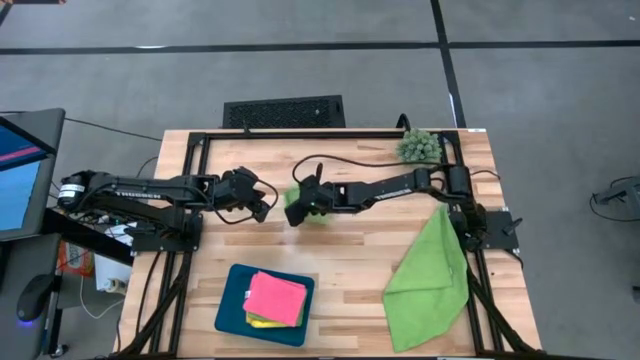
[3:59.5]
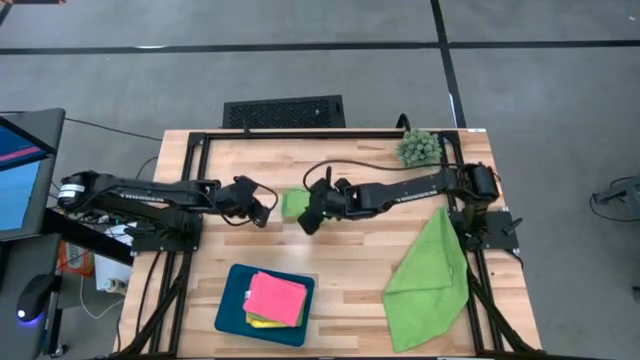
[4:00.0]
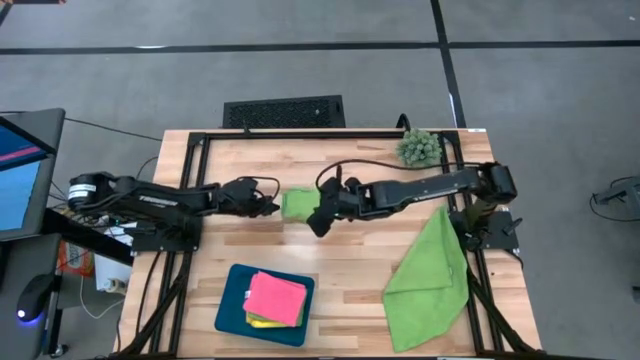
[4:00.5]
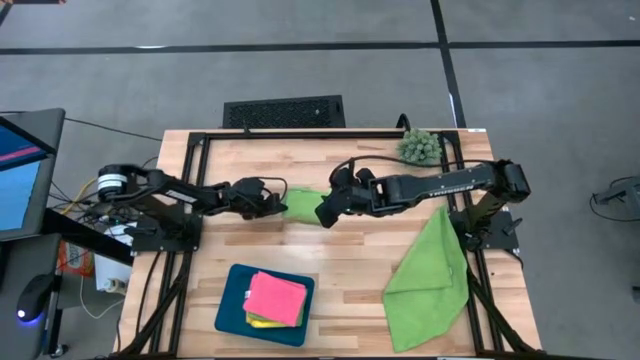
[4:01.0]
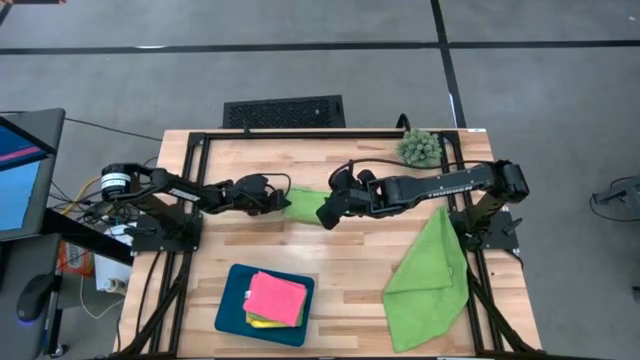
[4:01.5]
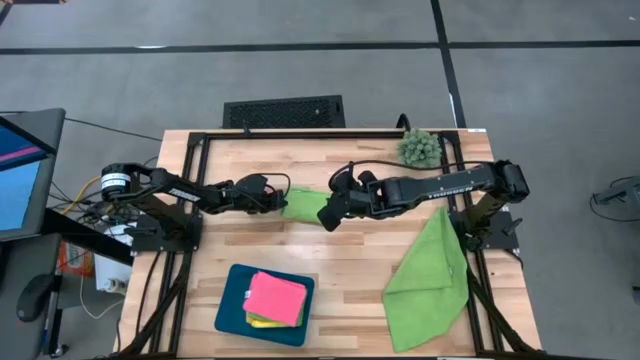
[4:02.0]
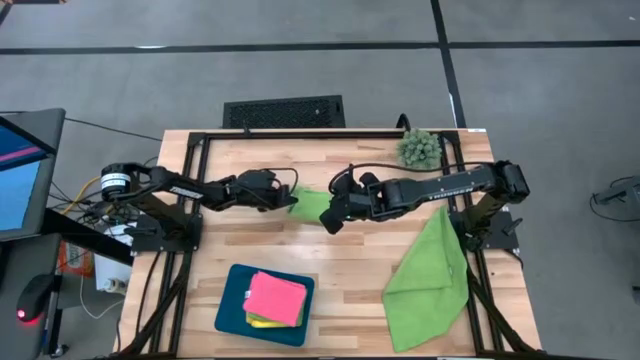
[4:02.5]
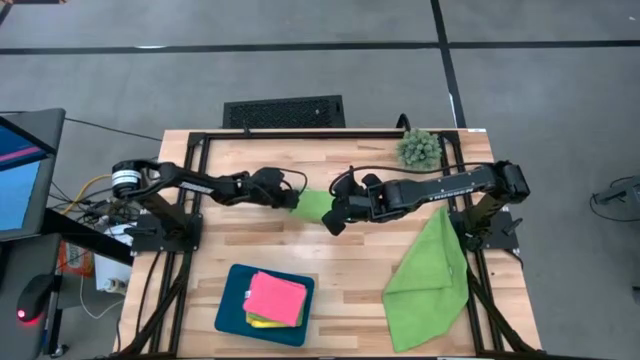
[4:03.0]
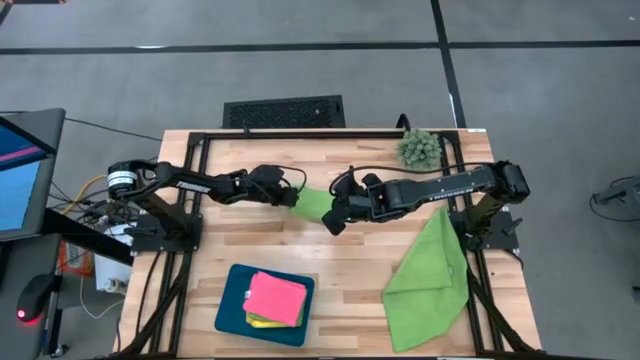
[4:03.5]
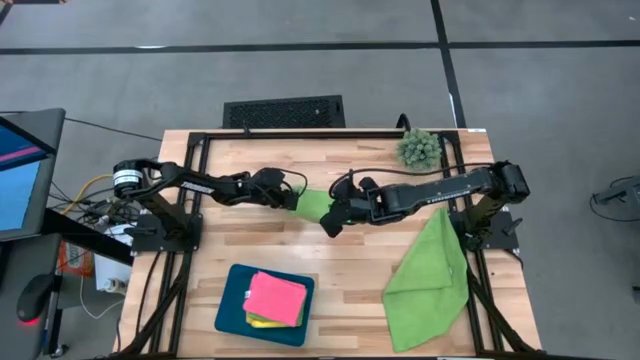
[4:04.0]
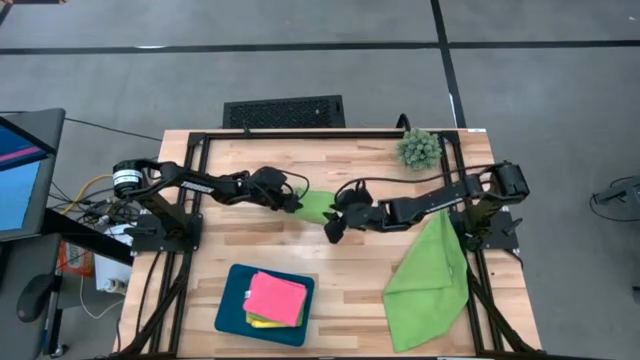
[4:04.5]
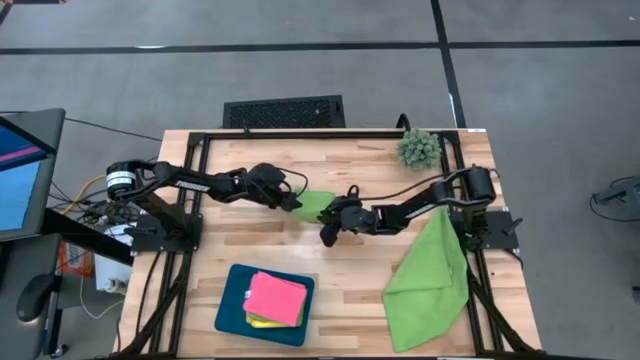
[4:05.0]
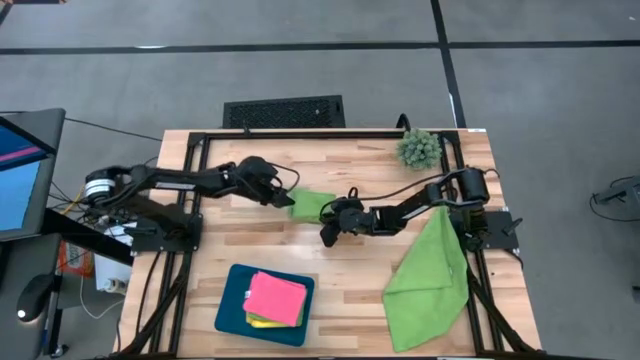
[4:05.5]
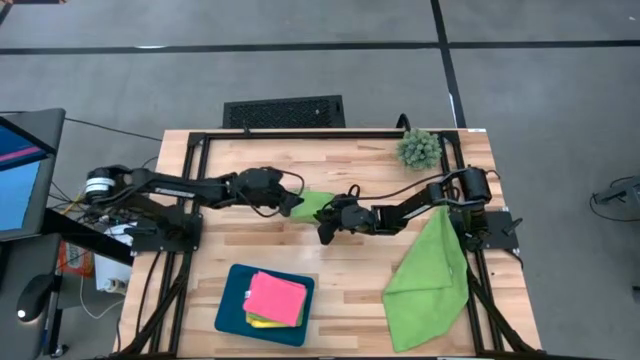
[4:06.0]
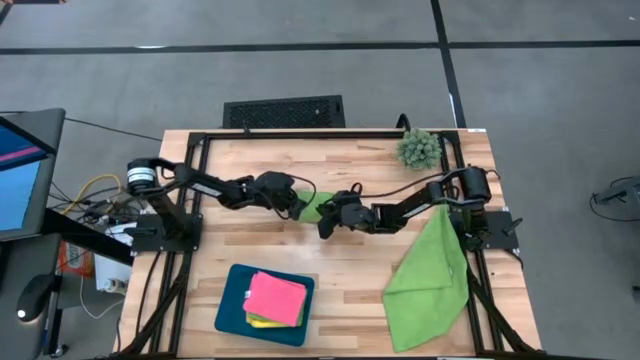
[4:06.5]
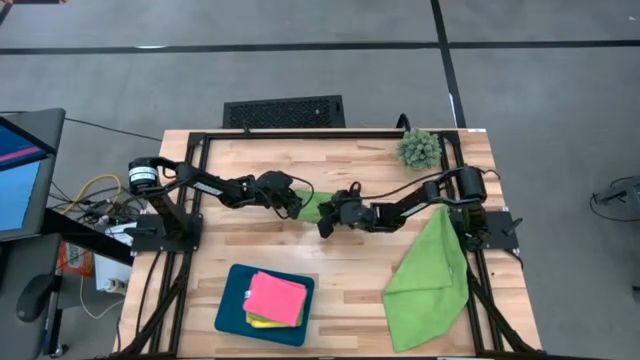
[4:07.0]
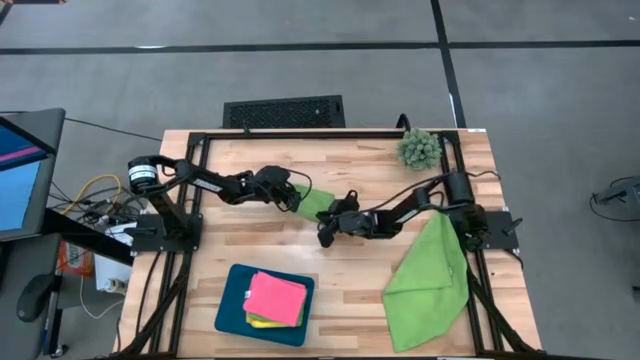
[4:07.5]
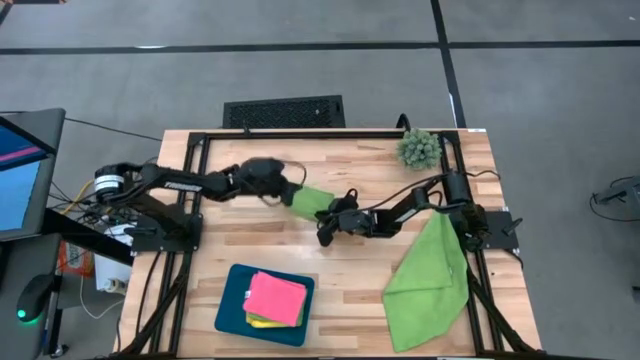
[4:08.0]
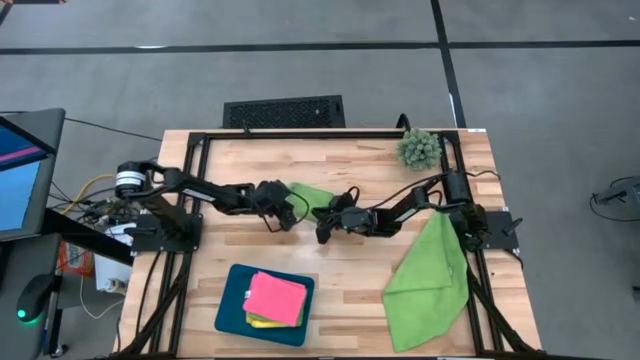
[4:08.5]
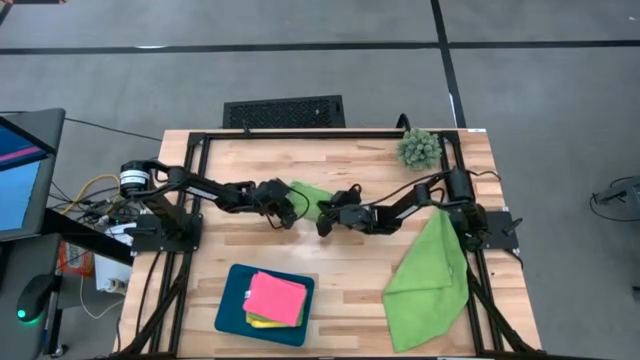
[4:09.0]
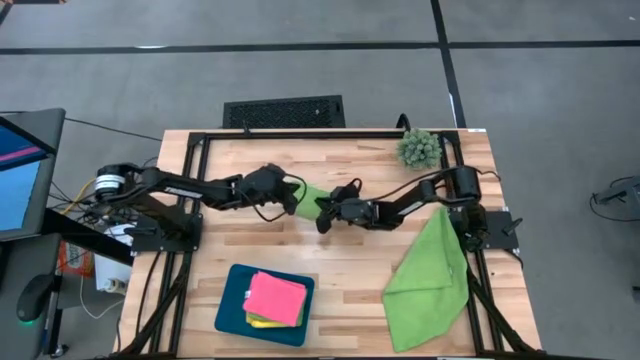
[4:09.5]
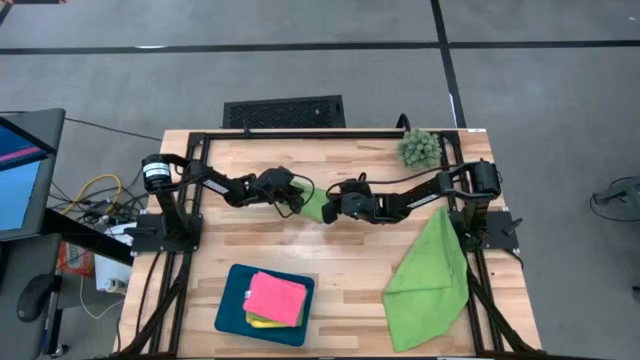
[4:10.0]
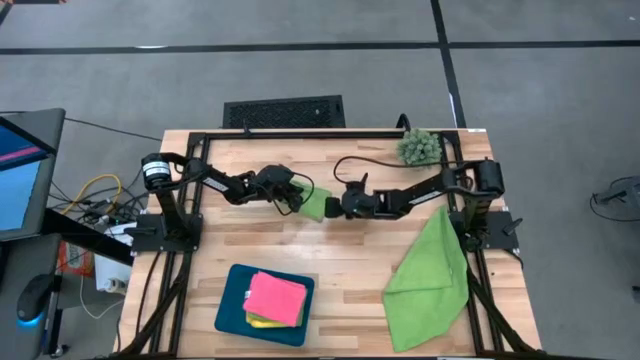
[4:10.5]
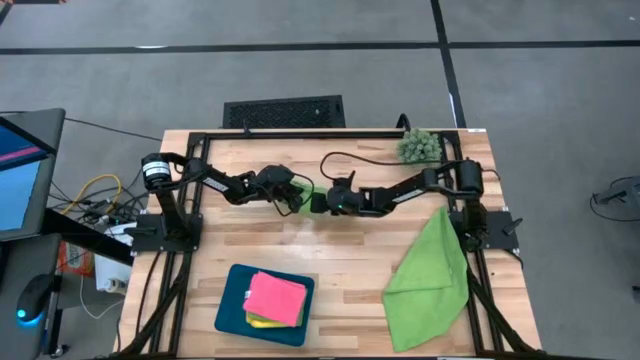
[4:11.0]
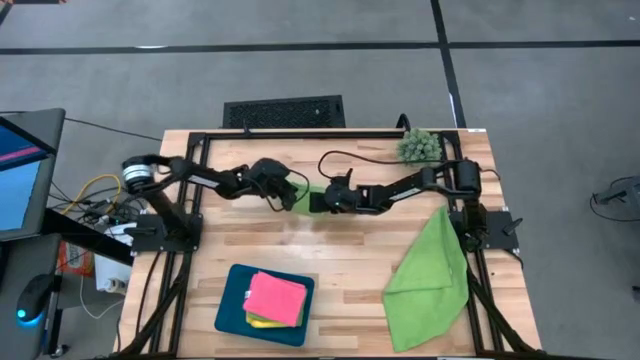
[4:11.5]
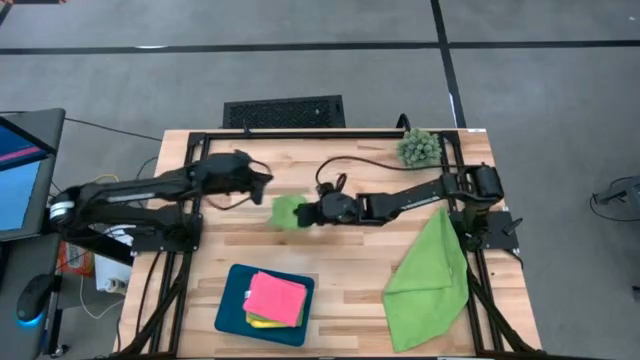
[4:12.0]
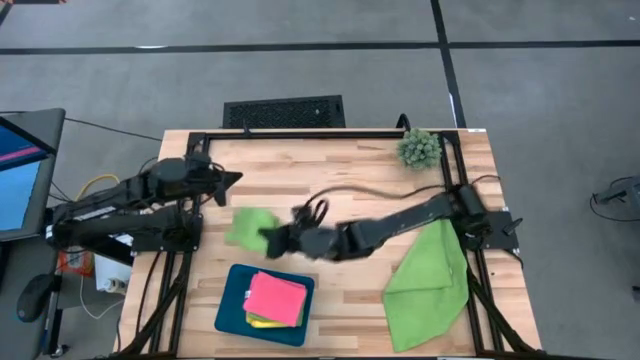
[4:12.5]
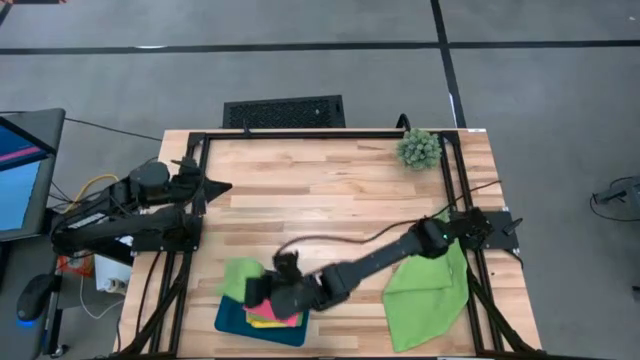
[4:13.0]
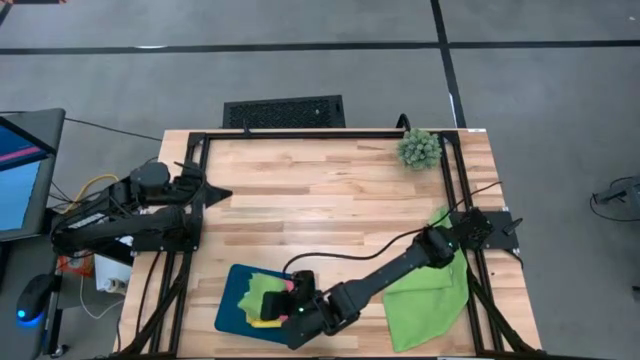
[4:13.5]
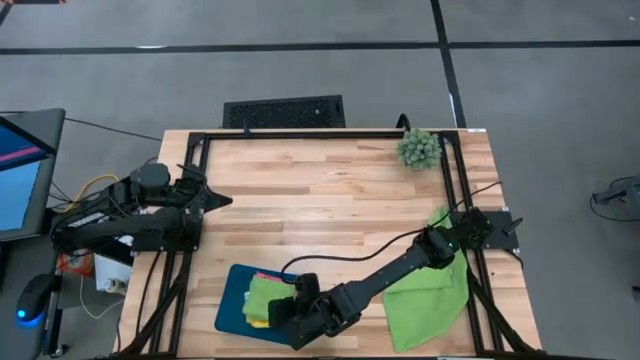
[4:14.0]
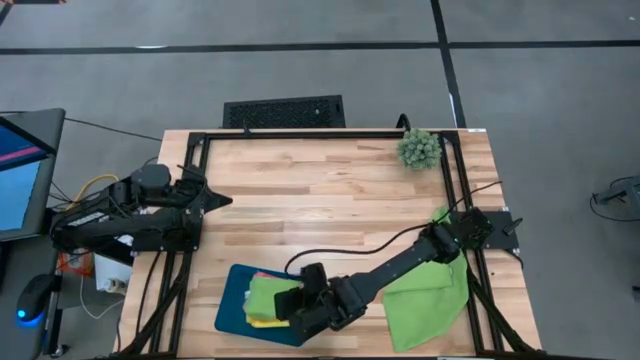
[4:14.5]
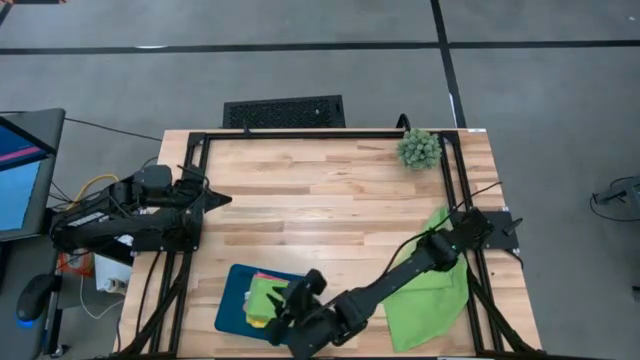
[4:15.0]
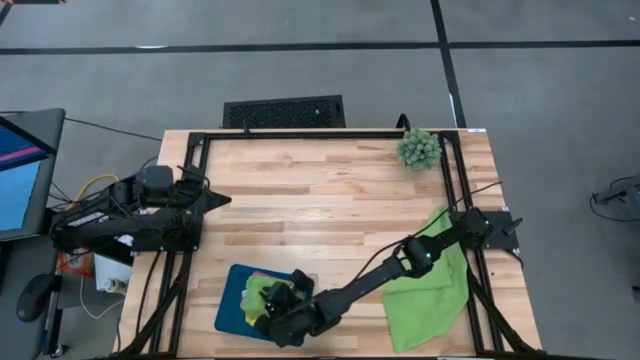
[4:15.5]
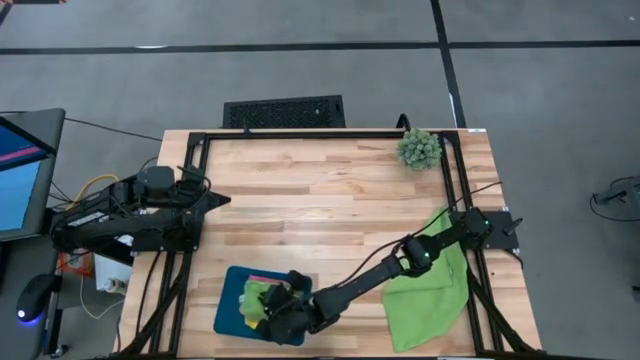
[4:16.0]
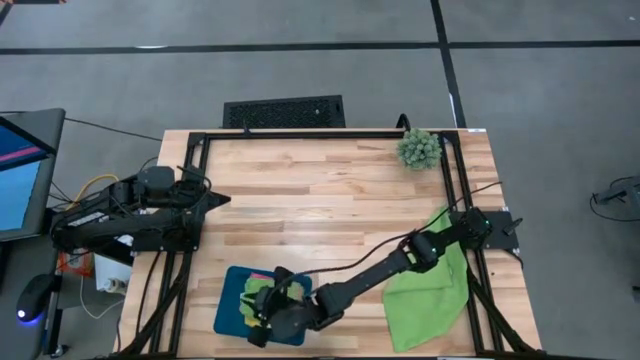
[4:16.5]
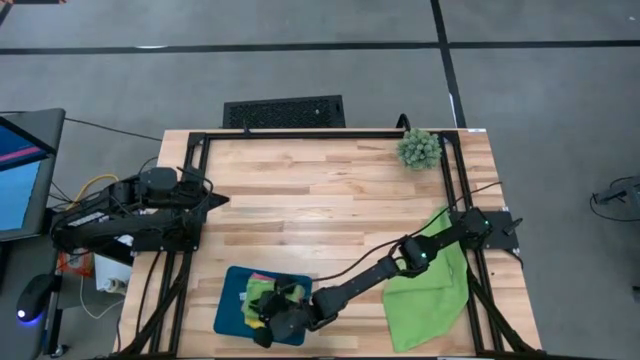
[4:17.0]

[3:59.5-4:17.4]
Task: Fold microfiber towels
Stack the top green microfiber towel on top of the pink microfiber towel in the blue bin

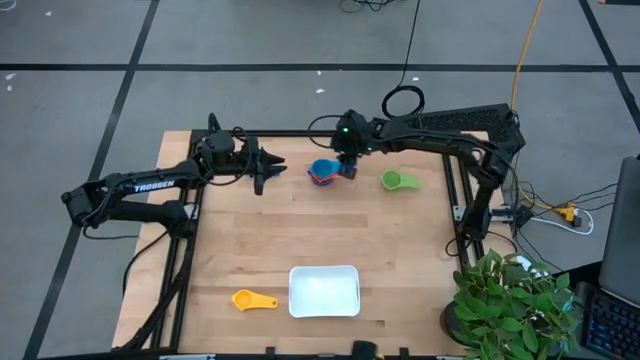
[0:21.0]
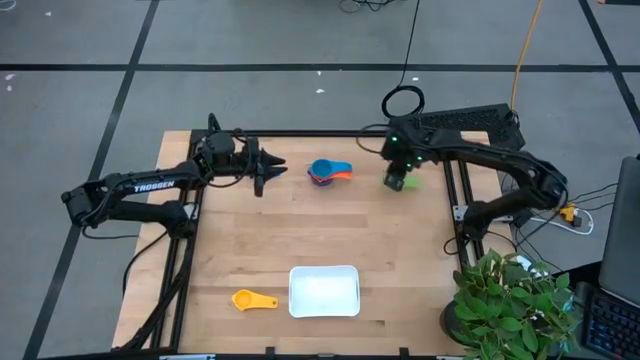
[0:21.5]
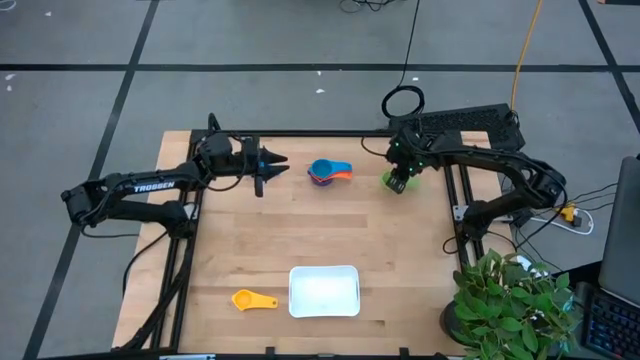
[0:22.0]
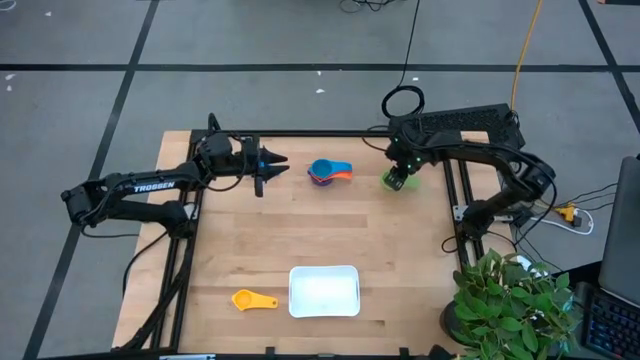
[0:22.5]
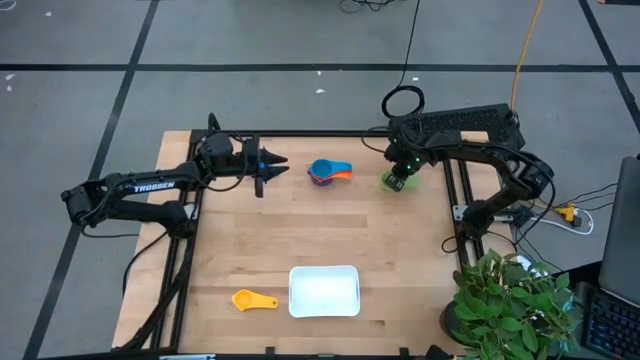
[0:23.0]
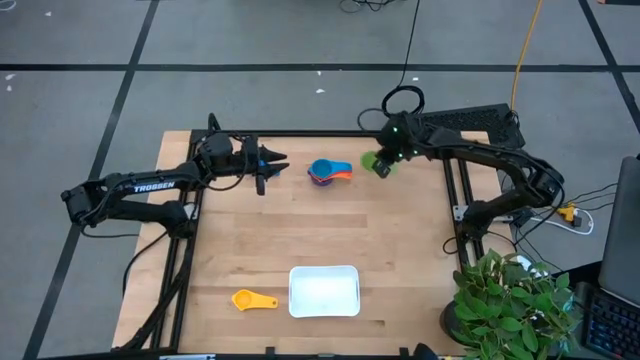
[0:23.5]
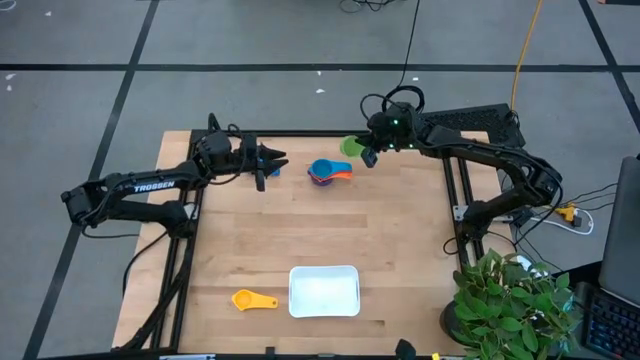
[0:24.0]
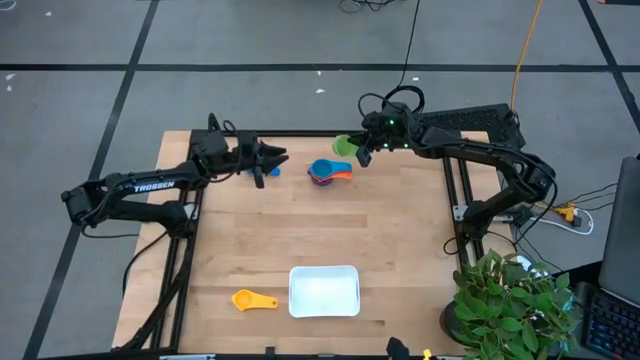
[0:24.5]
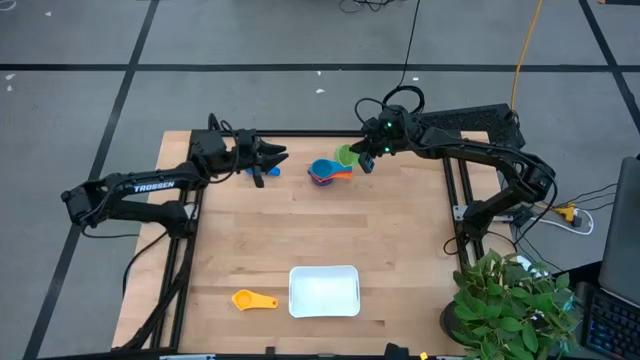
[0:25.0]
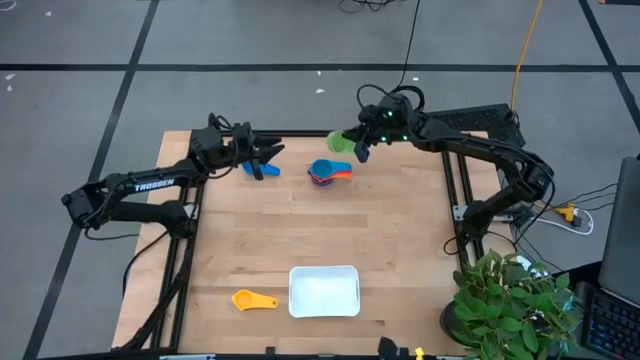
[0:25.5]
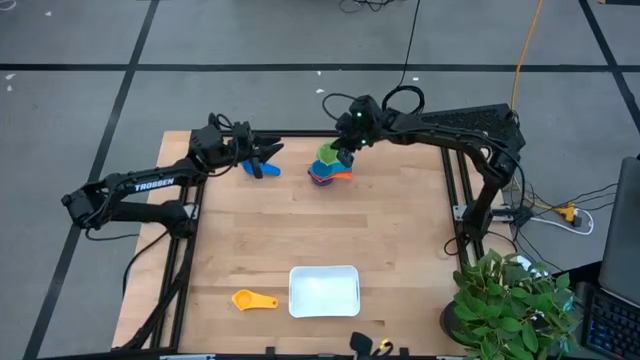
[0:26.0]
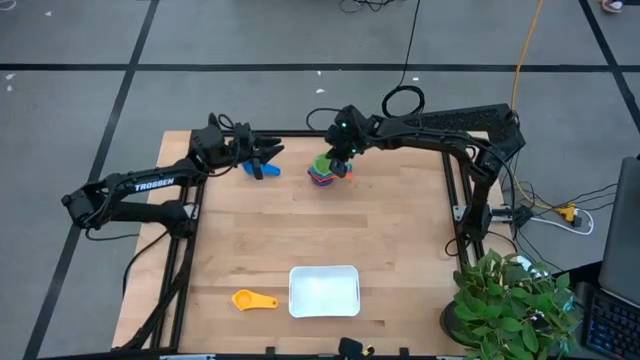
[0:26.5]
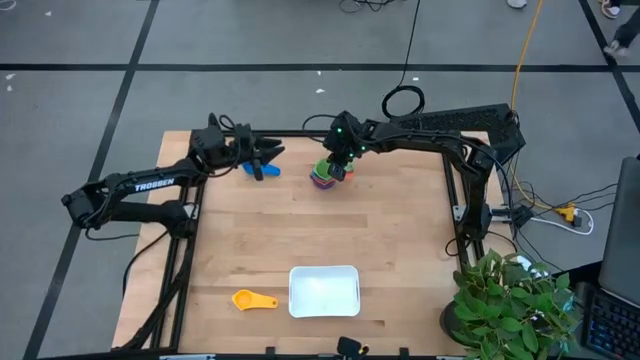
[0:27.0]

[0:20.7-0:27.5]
Task: Nest measuring cups in basket
Stack the green measuring cup on the light blue measuring cup
